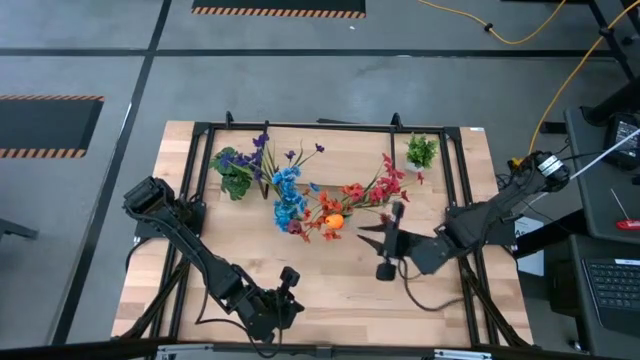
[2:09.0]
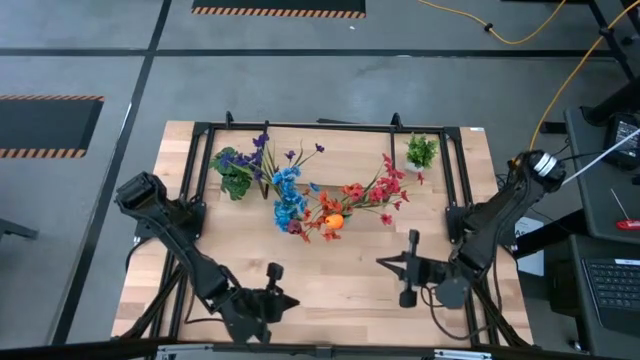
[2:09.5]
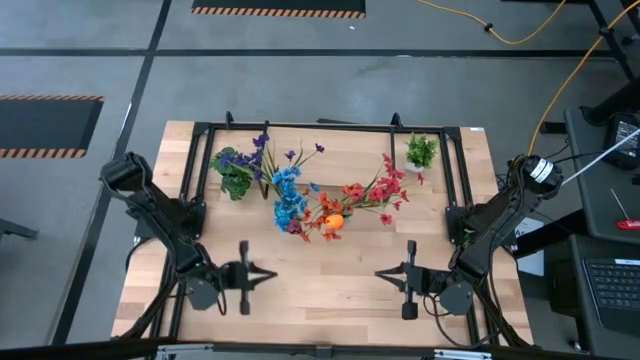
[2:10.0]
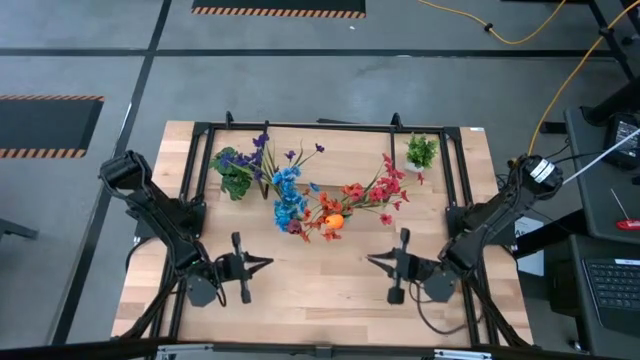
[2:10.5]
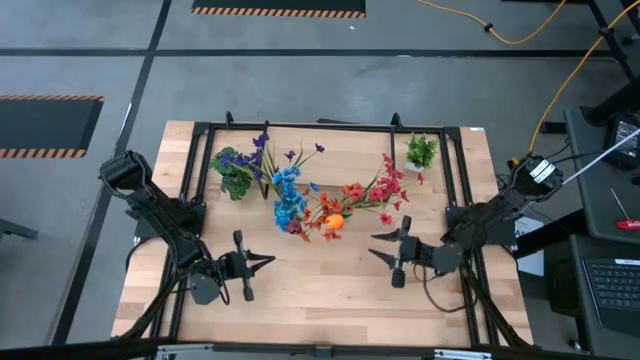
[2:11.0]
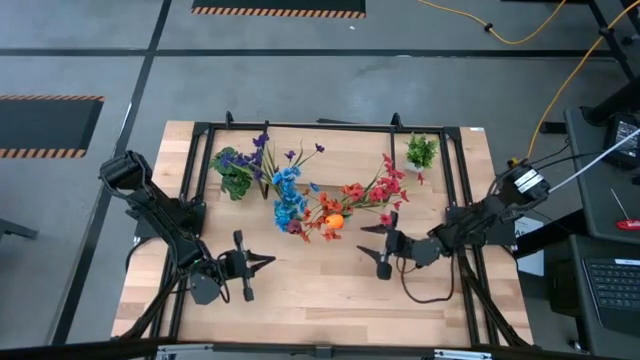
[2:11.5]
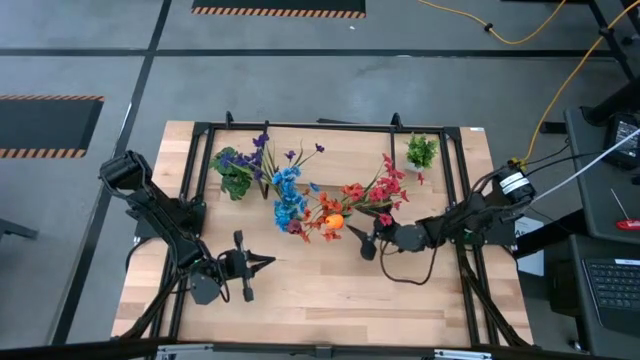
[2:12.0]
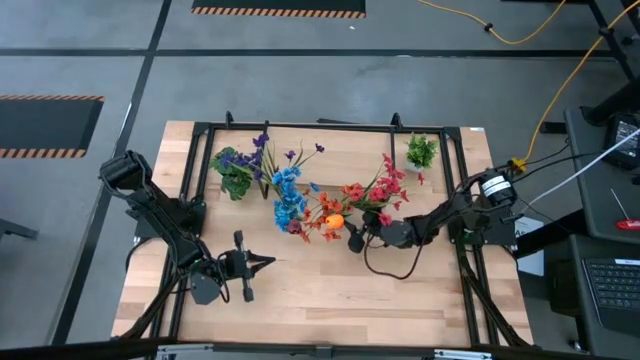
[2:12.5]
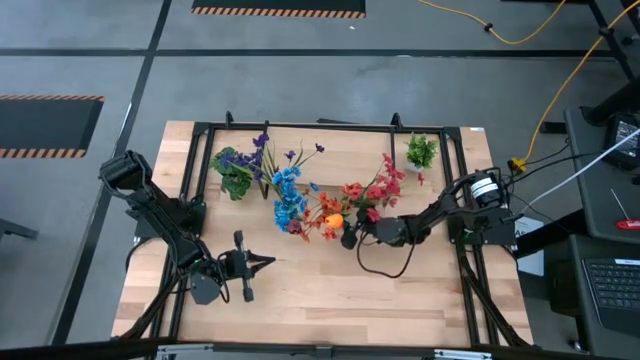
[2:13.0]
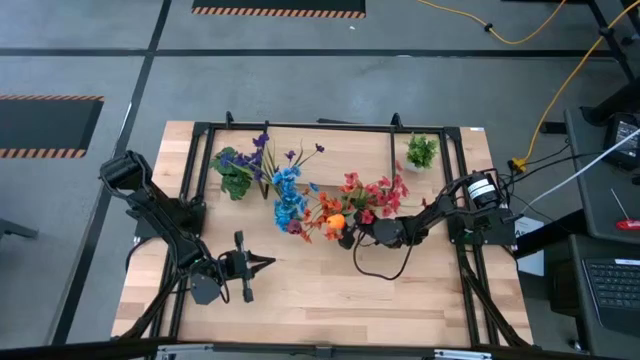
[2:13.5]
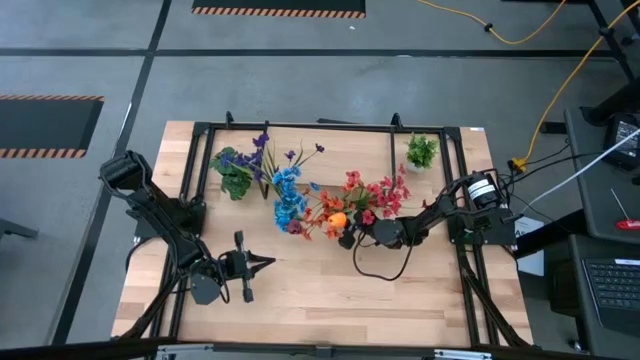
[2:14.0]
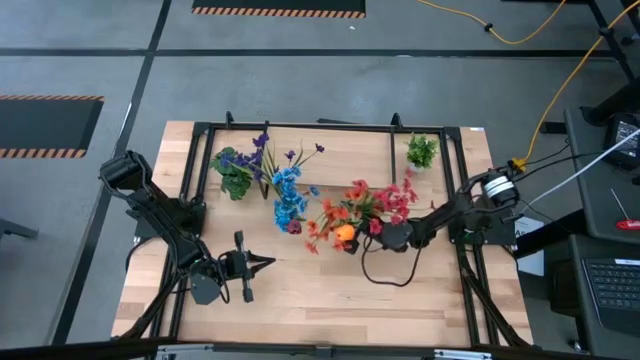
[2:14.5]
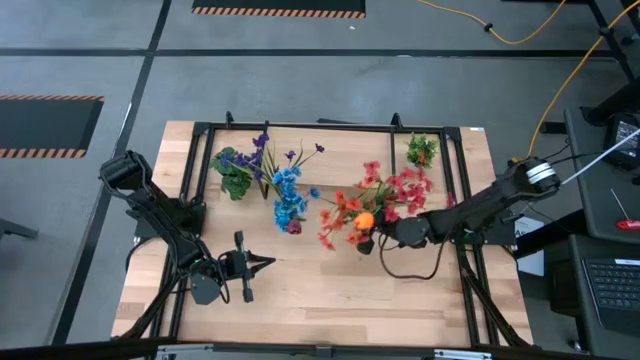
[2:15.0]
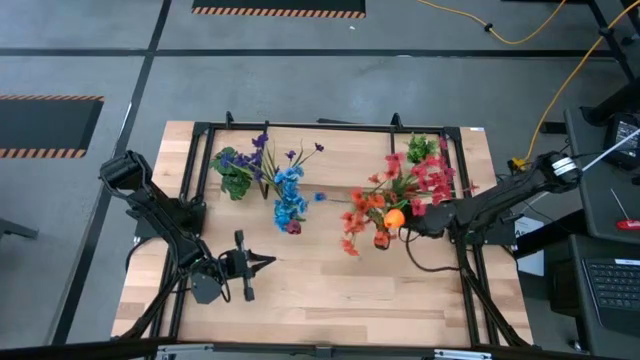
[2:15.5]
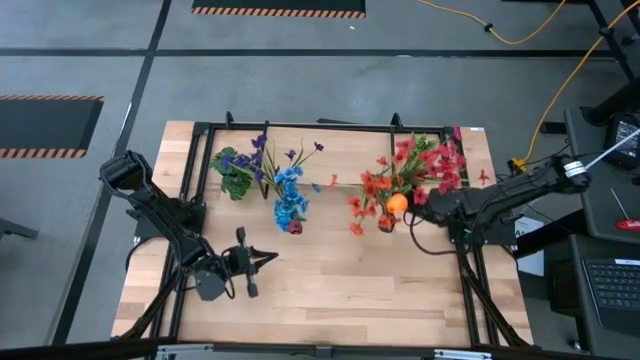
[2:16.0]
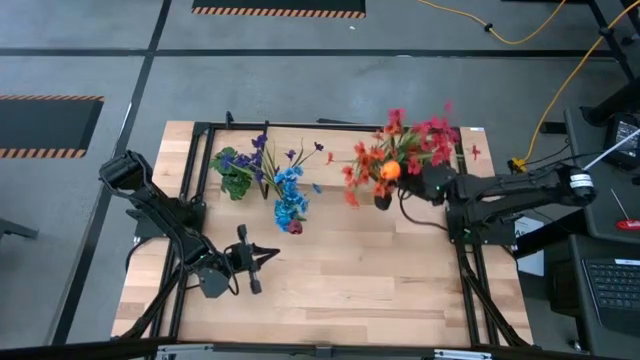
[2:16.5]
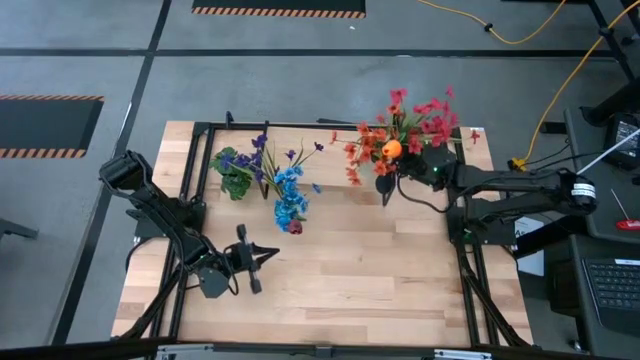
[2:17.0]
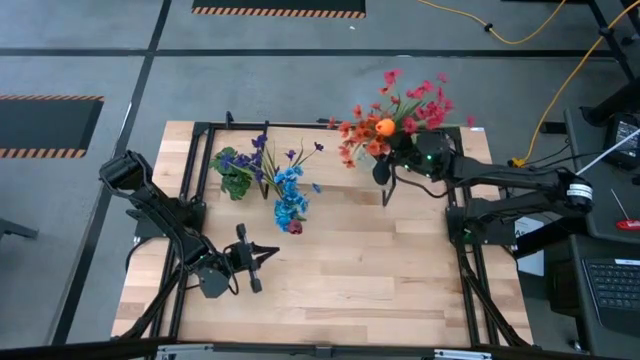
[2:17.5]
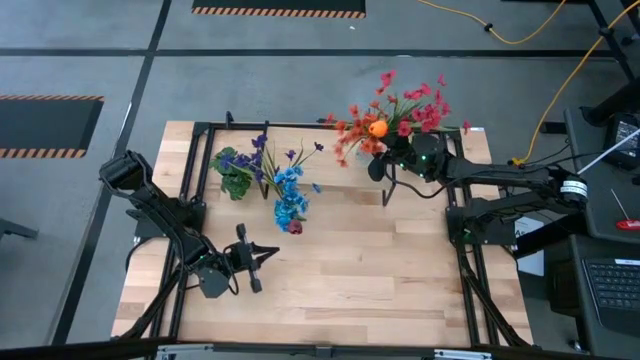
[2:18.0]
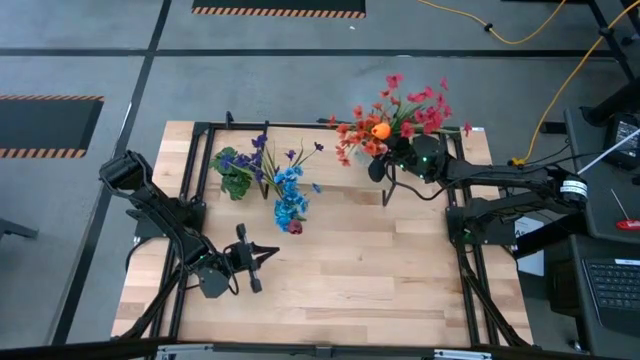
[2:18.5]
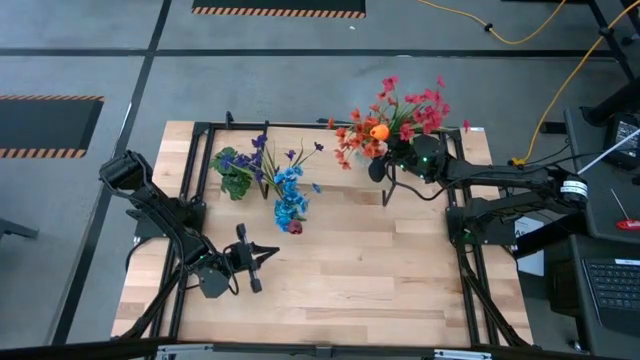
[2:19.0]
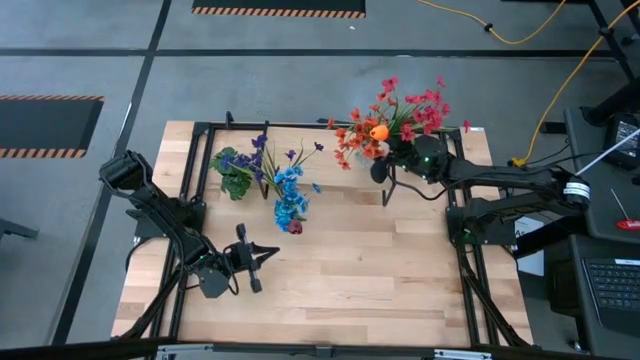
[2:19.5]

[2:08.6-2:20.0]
Task: Pick and place flowers into a vace then onto a shelf
Put the transparent vase on top of the shelf

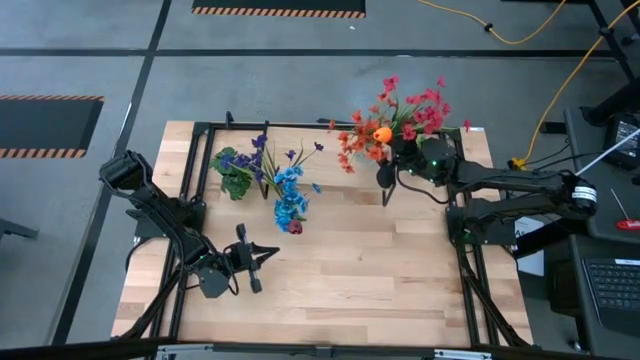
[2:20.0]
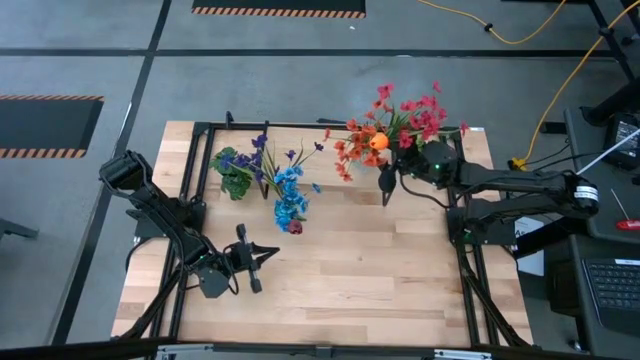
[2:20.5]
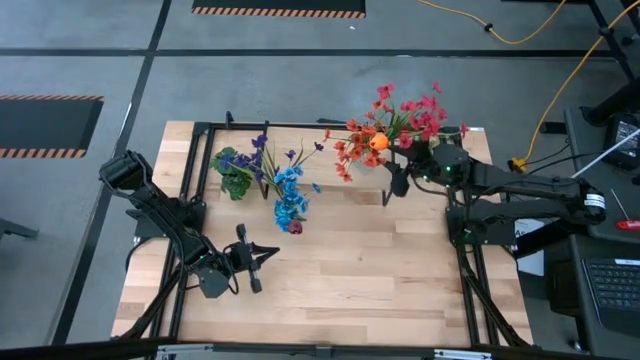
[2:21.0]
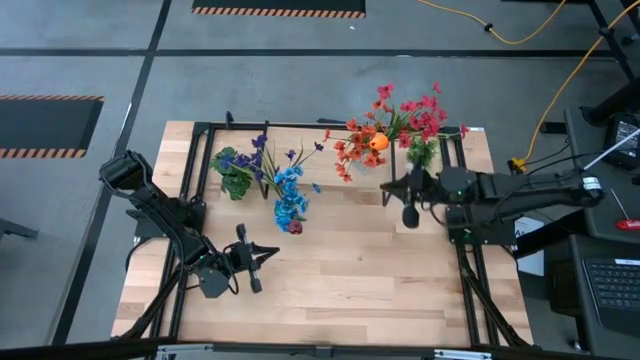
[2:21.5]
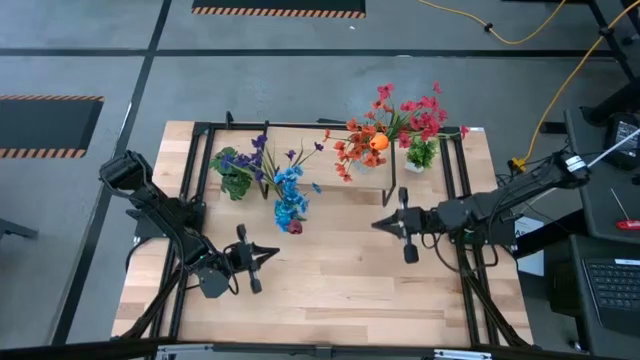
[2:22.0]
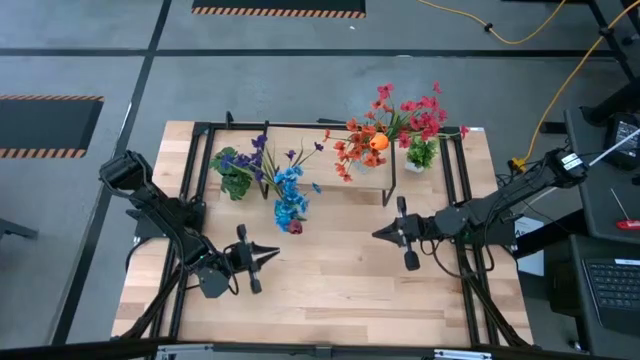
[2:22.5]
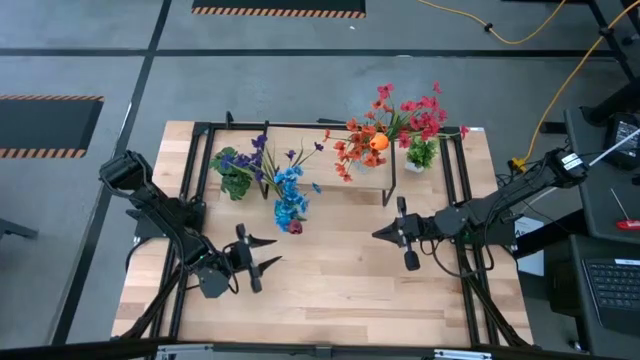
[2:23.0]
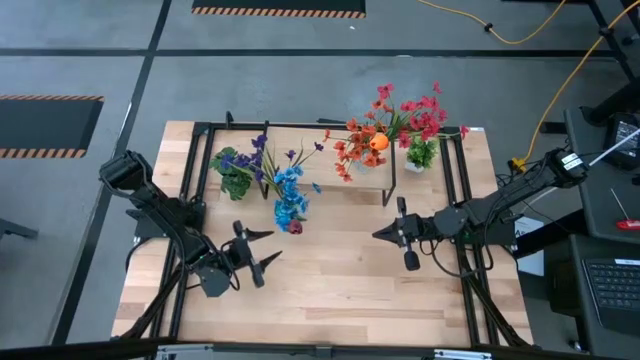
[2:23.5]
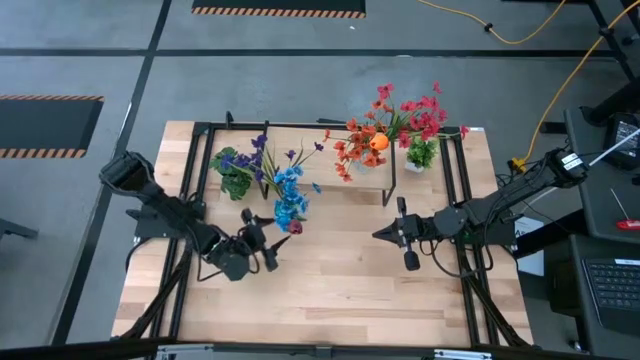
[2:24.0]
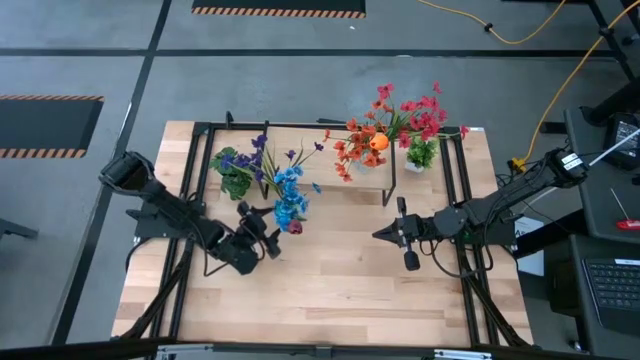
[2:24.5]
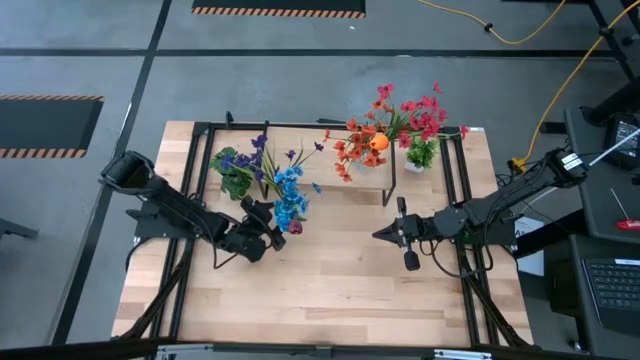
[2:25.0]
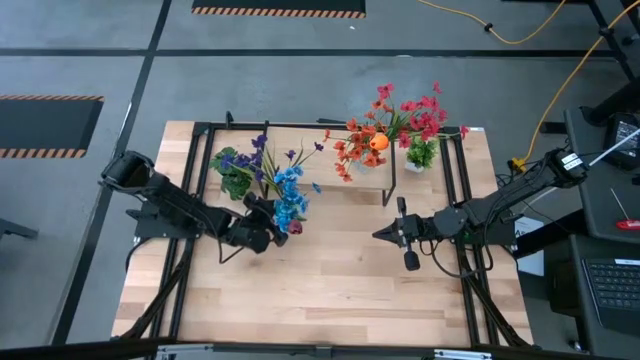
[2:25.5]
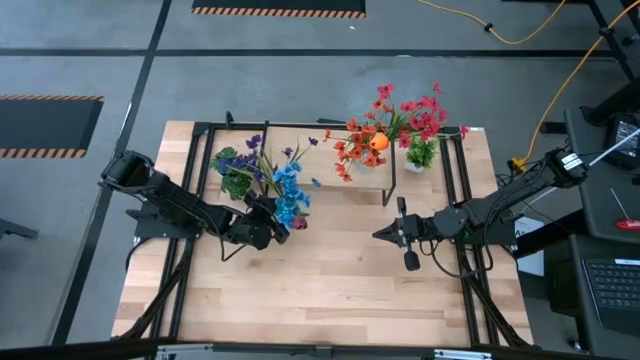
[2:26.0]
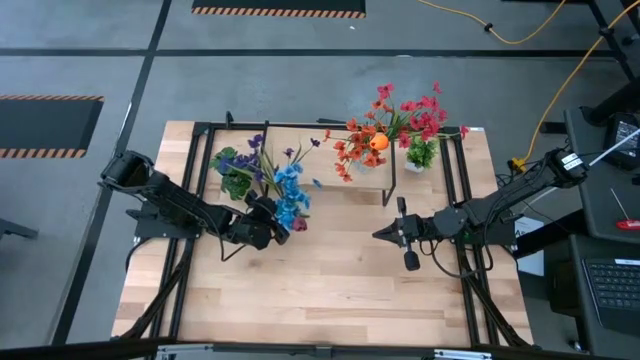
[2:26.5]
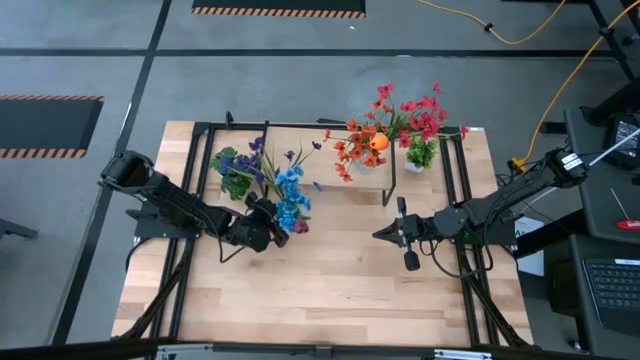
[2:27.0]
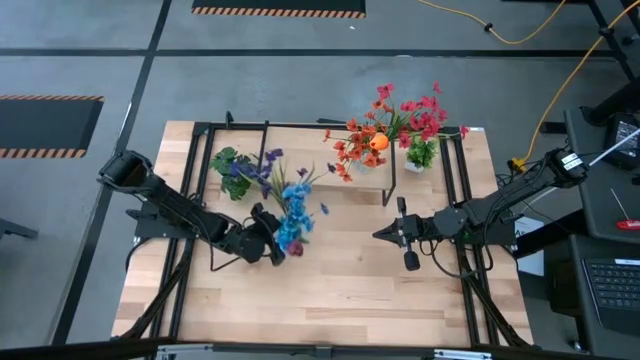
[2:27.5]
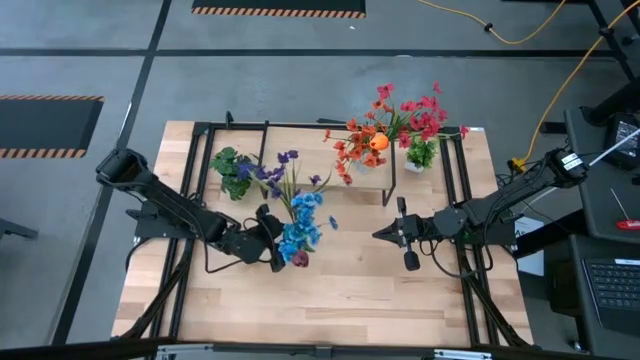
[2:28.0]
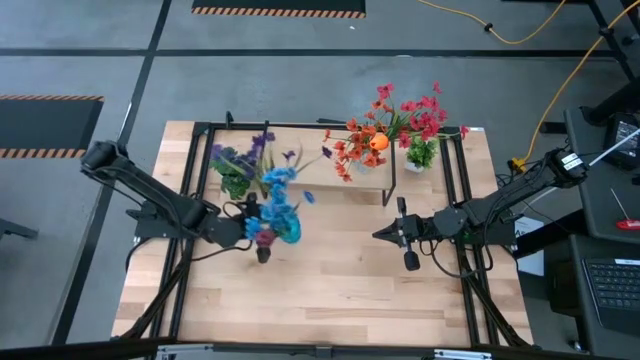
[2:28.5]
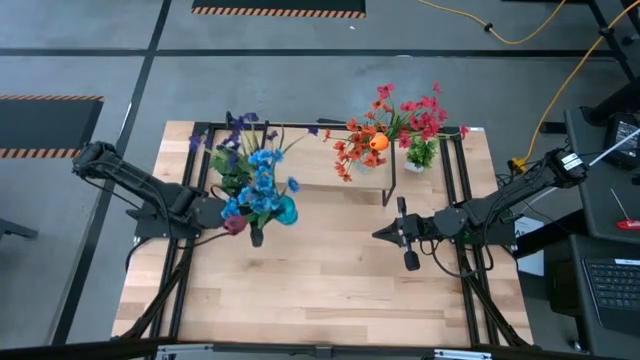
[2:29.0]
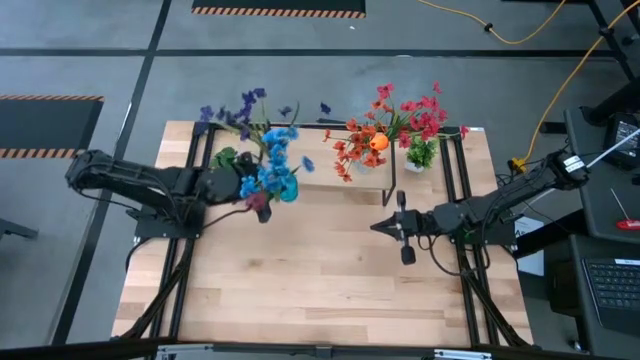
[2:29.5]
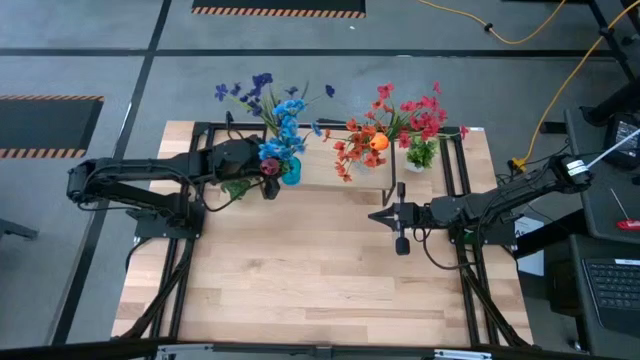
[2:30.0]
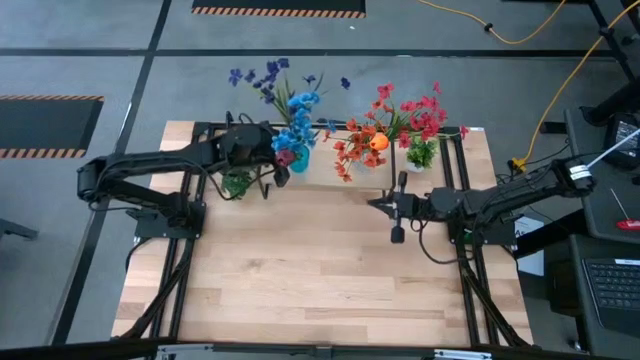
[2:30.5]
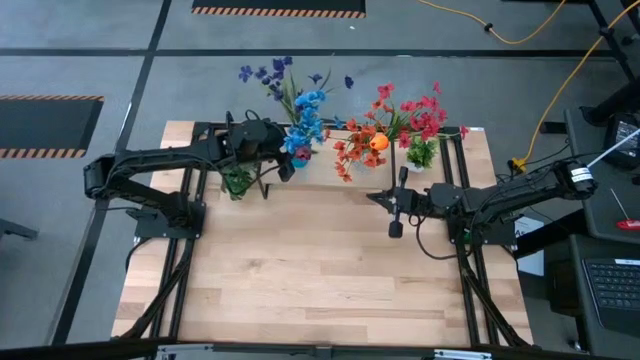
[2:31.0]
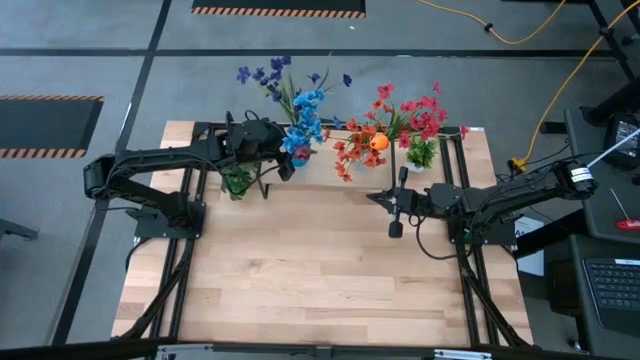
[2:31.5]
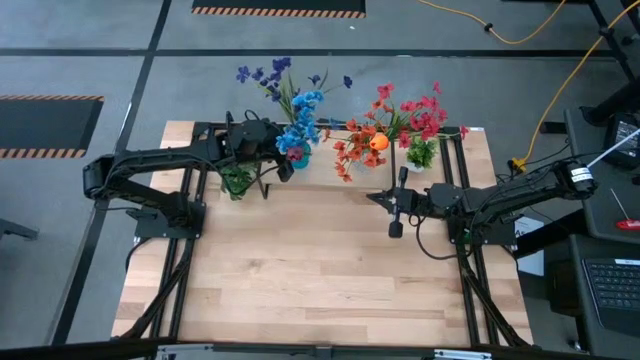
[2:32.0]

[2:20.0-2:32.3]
Put the transparent blue vase on top of the shelf
